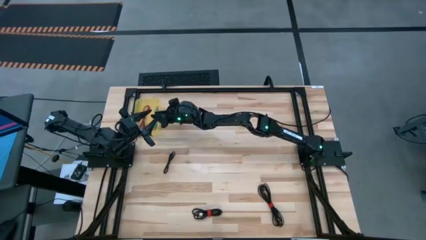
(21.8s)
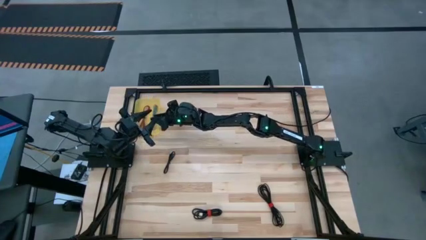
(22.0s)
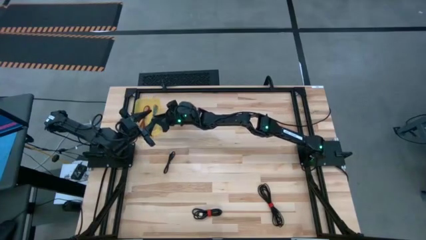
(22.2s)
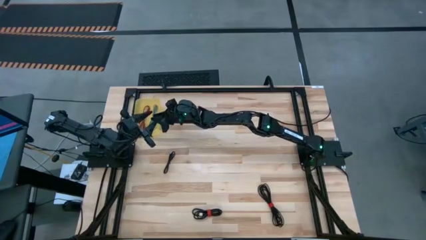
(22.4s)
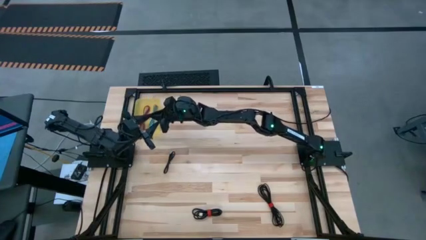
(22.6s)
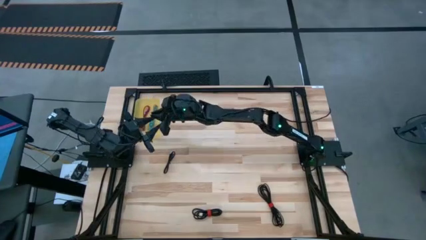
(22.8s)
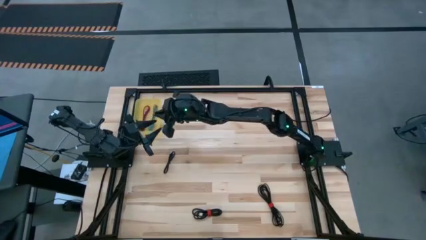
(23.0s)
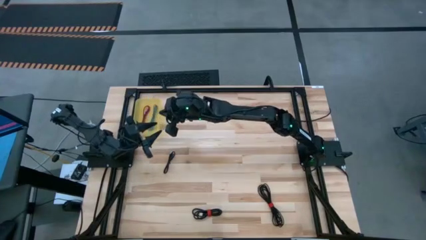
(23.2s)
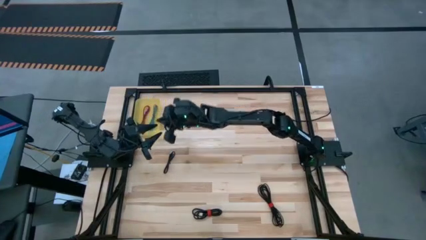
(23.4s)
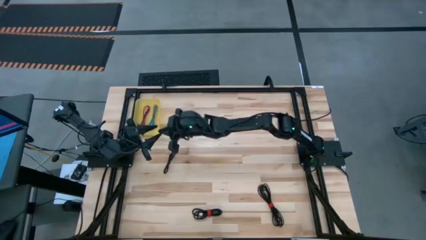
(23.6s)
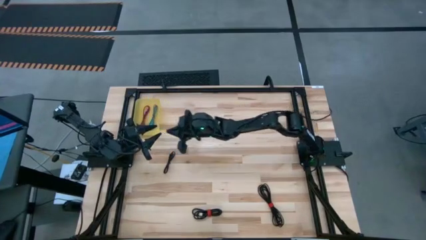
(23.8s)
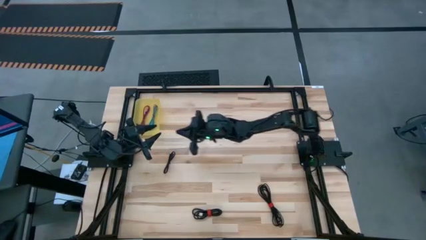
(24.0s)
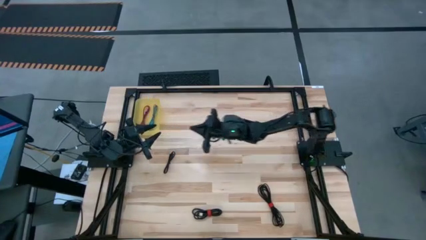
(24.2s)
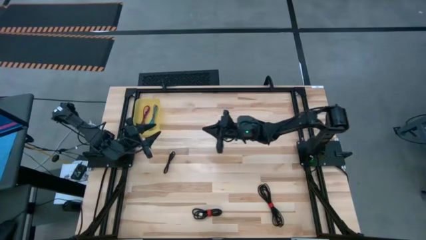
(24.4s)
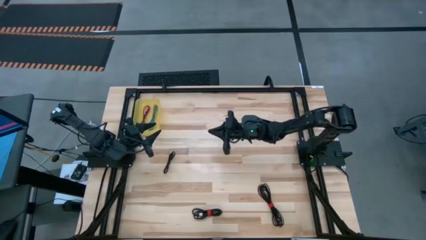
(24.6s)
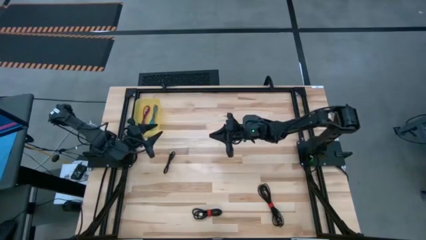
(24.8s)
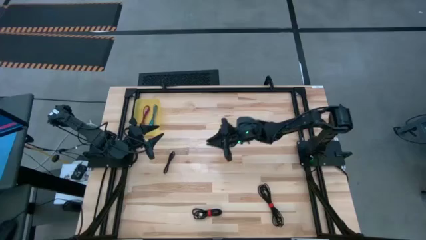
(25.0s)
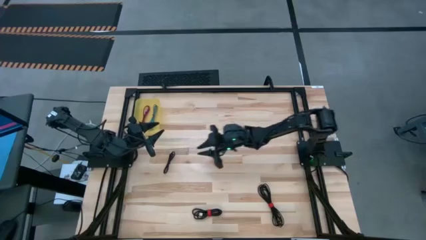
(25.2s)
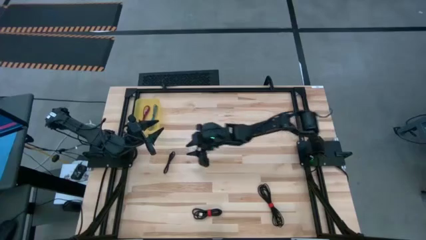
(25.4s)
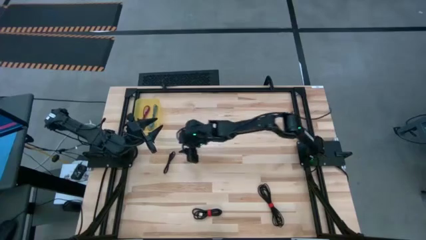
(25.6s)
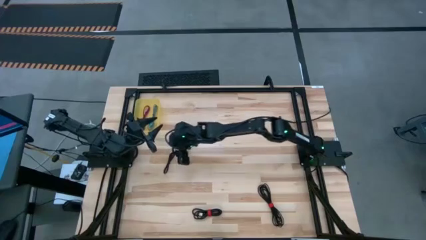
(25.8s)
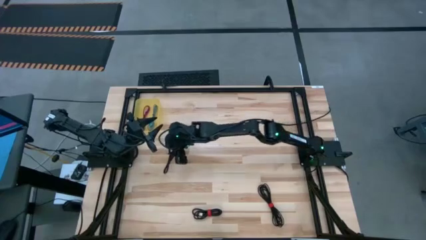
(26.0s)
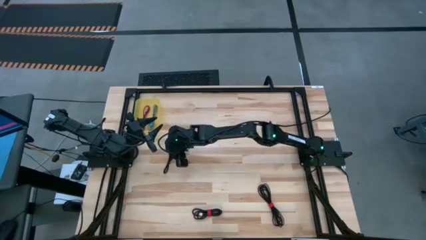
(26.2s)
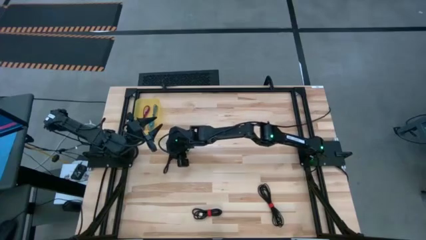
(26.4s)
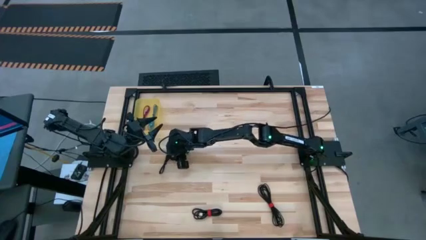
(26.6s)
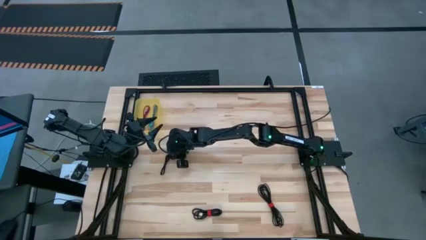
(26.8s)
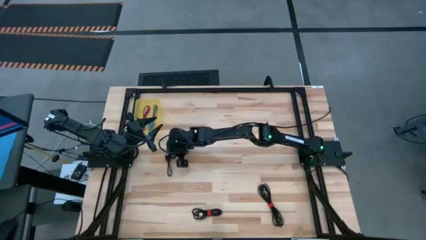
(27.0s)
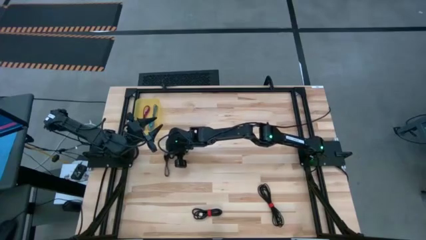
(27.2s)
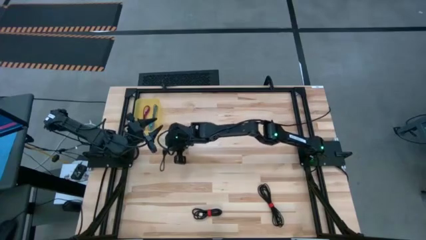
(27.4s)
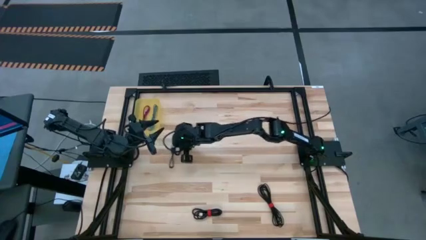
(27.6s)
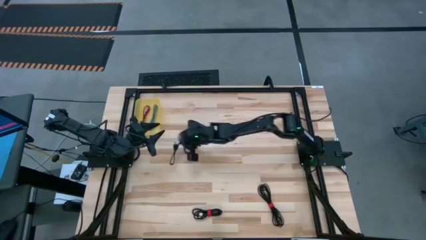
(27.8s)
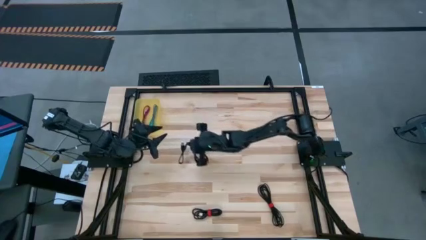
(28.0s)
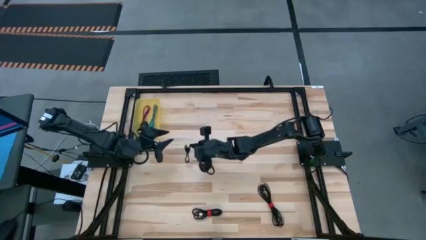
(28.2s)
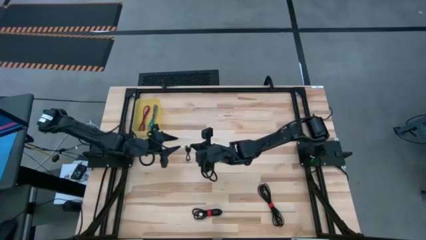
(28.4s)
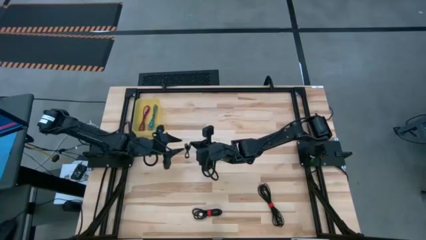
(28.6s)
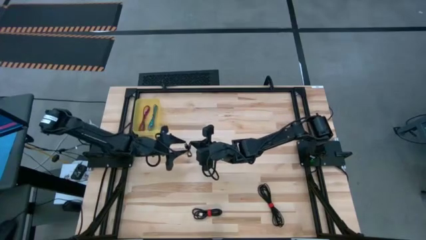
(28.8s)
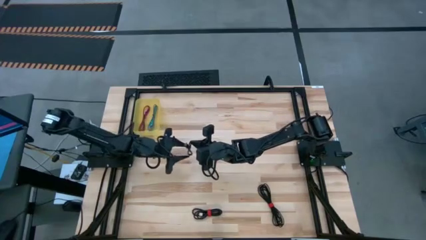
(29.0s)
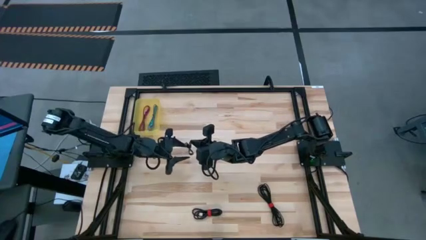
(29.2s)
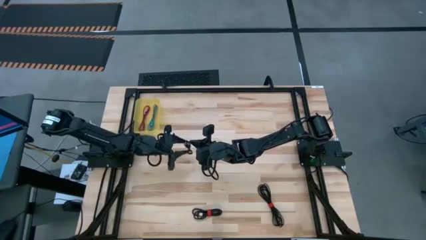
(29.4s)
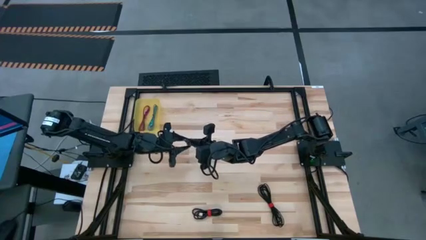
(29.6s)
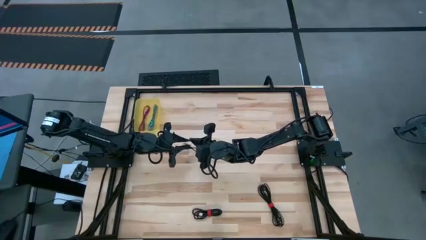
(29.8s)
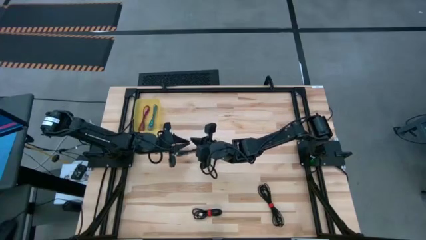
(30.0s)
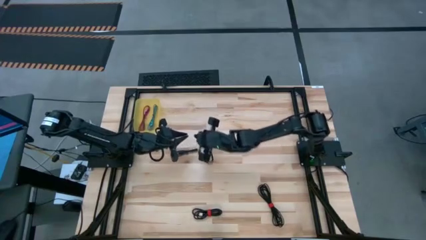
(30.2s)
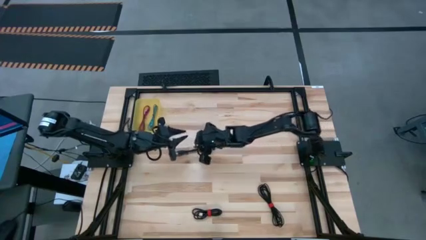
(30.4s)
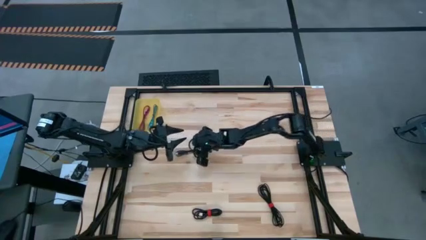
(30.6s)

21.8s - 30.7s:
Task: Pick and place USB-C Cables
Put the top black USB cable into the yellow bin

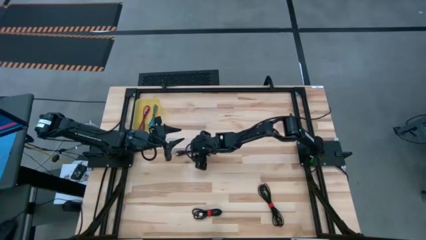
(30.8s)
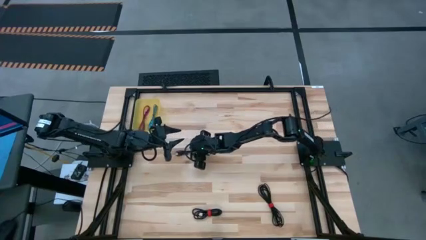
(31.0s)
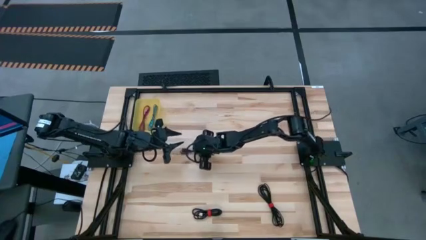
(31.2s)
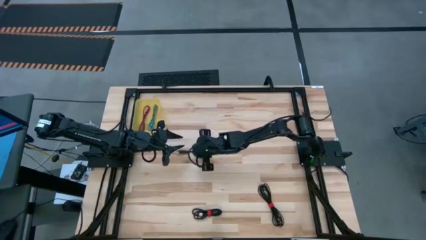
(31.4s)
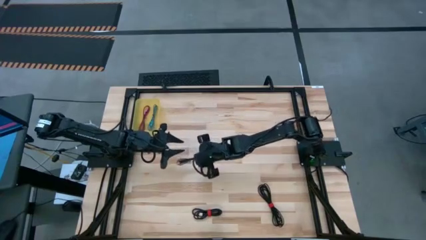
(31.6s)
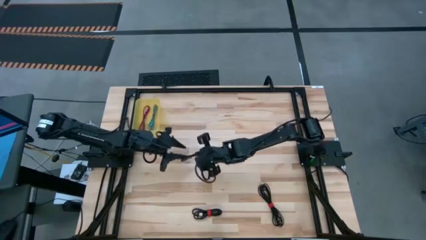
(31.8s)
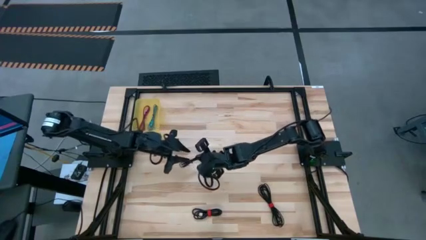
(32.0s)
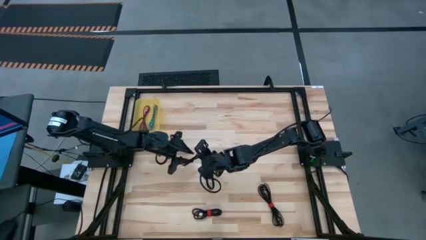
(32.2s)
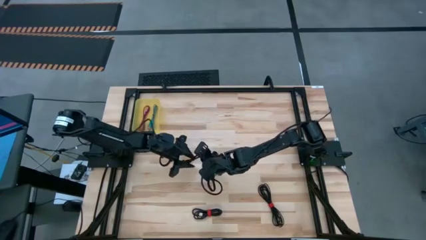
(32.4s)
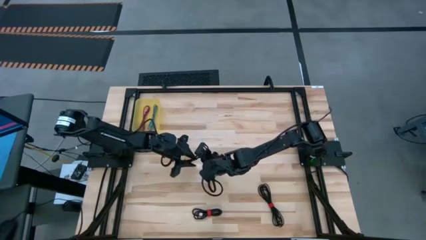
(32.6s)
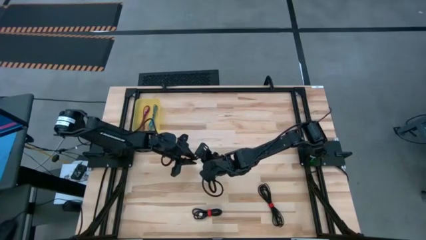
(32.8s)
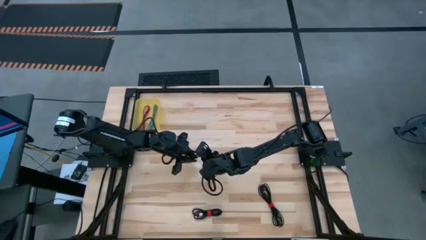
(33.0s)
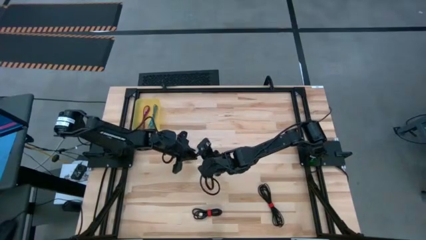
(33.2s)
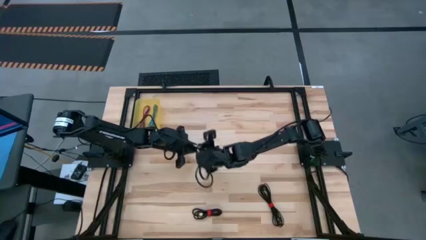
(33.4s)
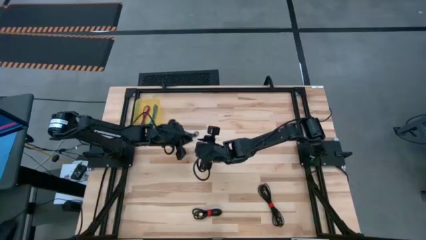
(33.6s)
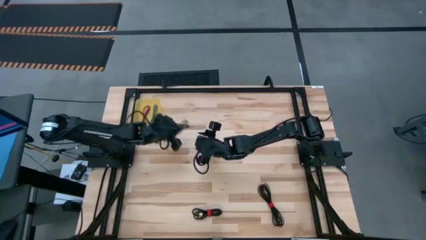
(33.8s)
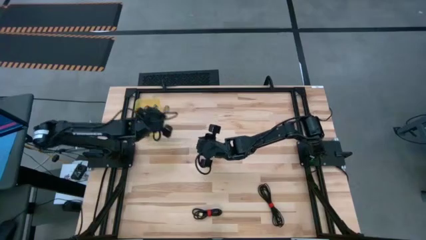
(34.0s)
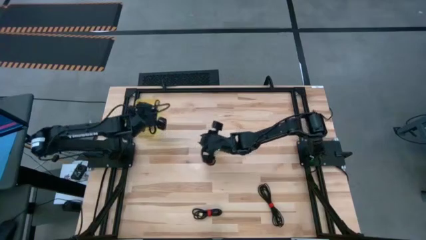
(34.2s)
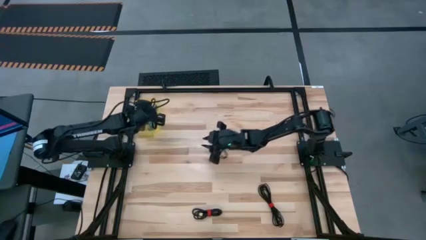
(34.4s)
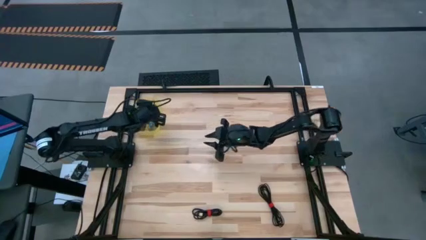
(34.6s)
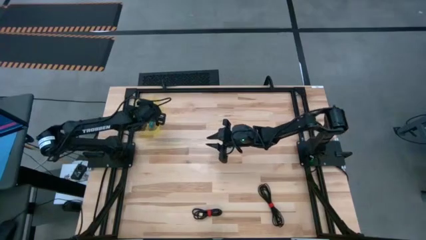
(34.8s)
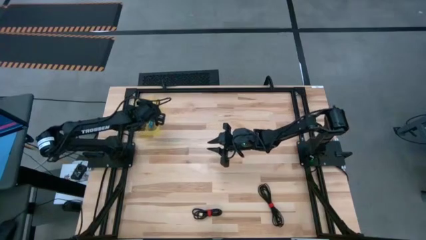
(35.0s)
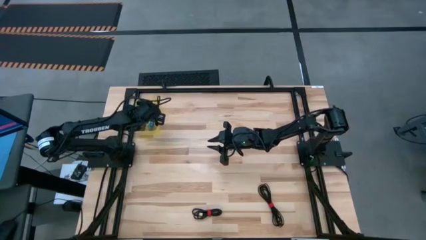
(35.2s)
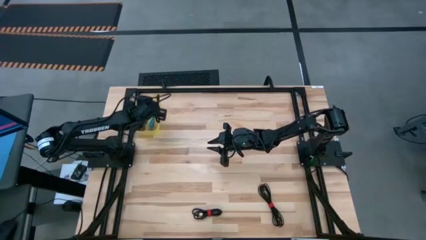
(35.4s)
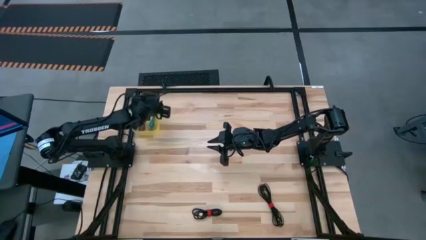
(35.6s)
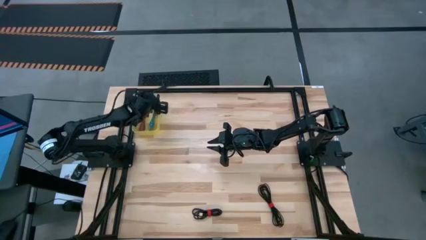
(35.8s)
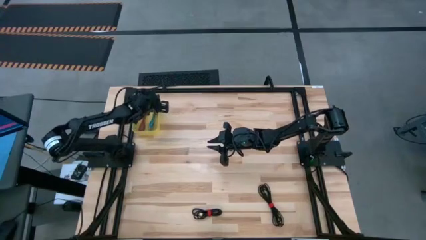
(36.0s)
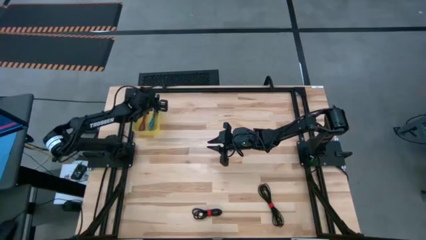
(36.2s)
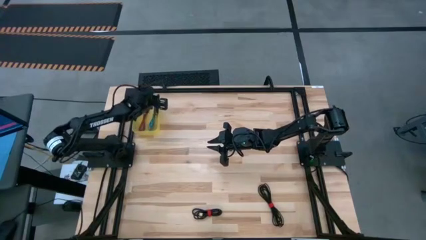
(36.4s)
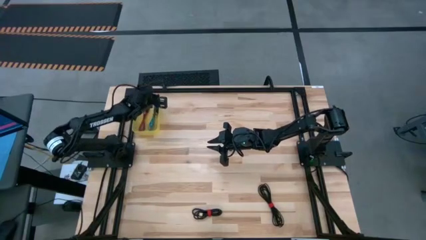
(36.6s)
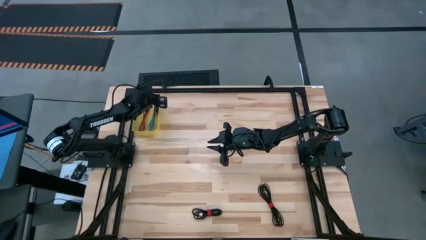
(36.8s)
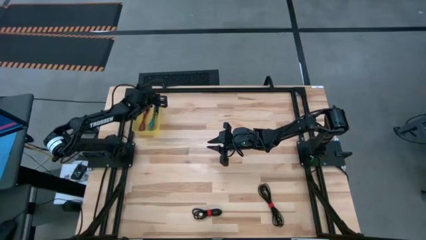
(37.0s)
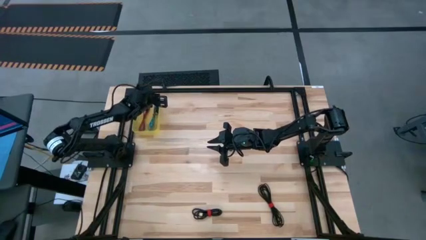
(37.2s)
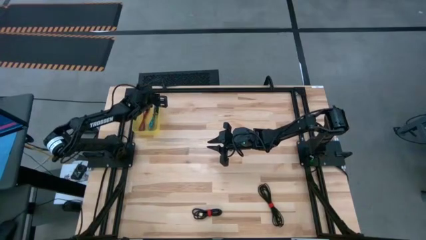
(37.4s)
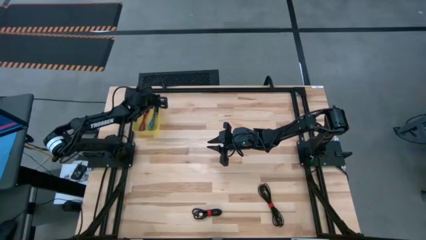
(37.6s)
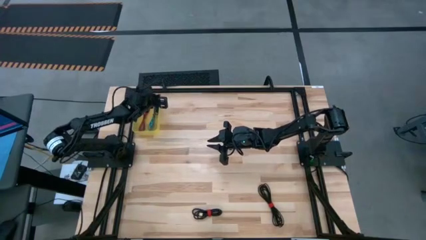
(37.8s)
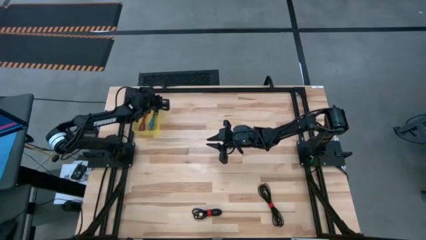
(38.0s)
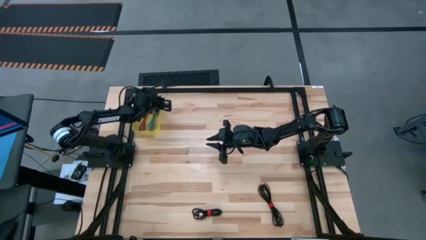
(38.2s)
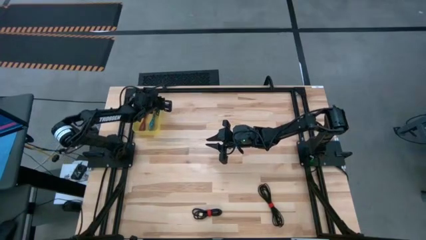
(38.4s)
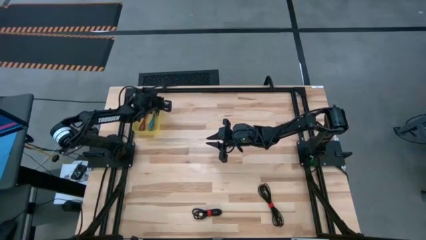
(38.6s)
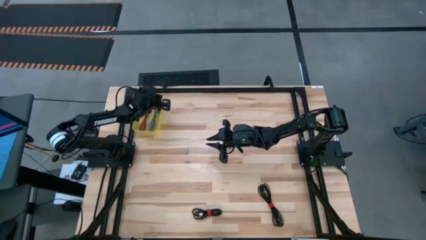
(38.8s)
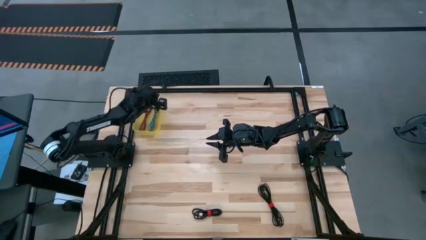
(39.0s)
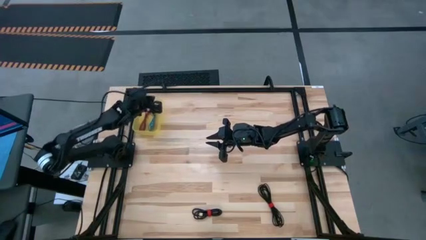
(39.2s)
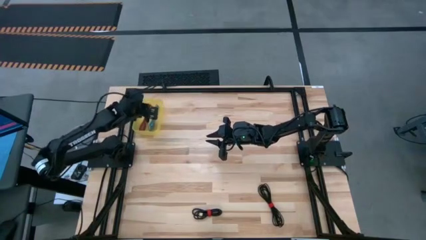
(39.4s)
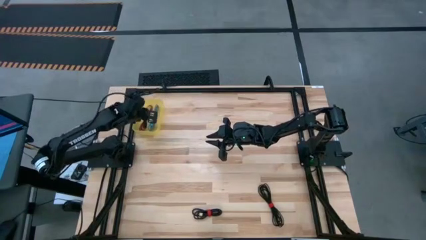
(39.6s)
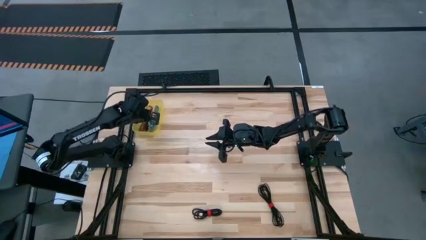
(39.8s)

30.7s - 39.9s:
Put the black USB cable into the yellow bin
